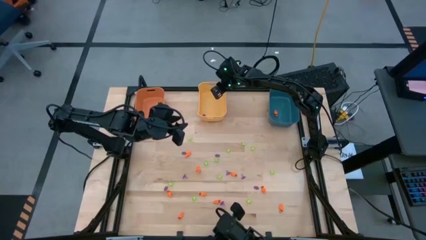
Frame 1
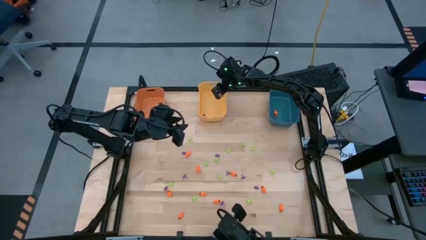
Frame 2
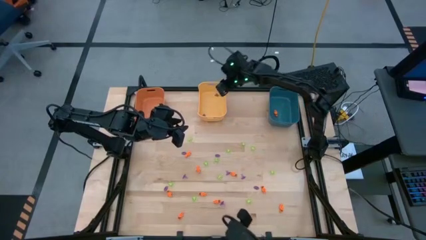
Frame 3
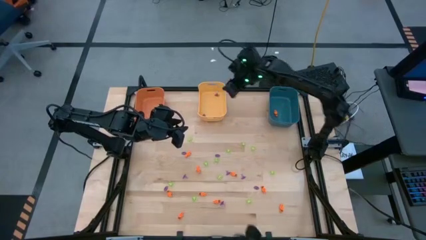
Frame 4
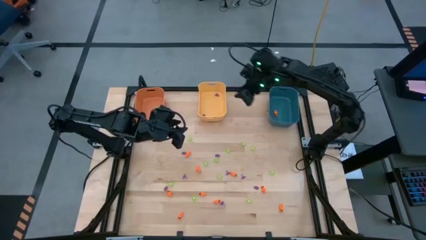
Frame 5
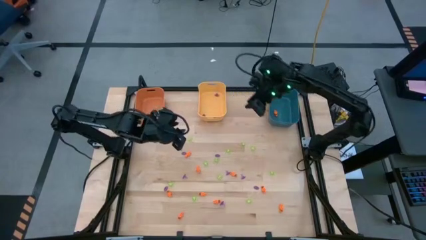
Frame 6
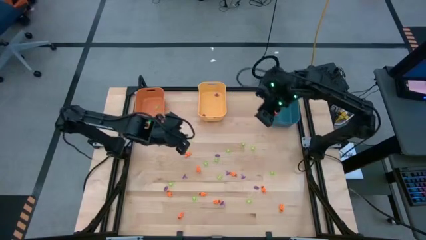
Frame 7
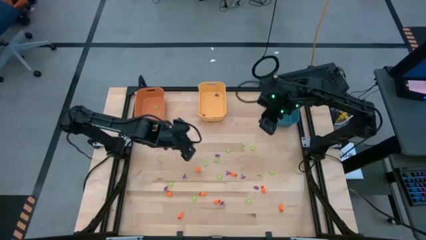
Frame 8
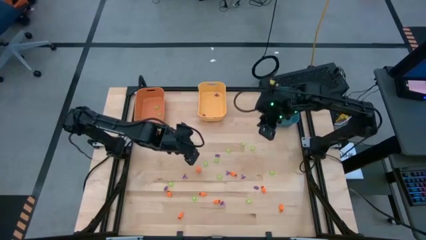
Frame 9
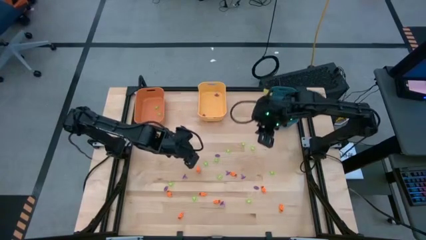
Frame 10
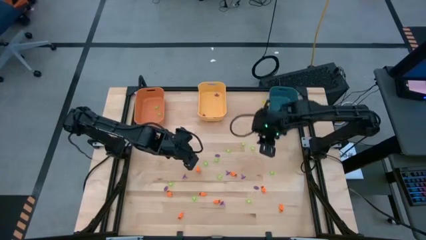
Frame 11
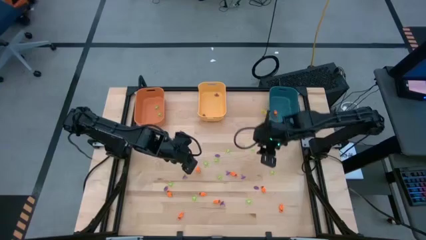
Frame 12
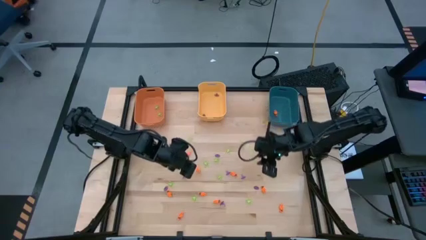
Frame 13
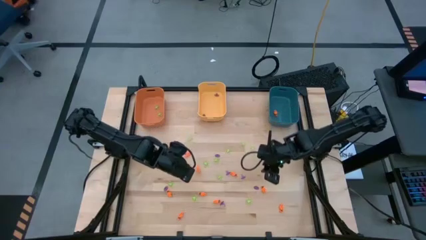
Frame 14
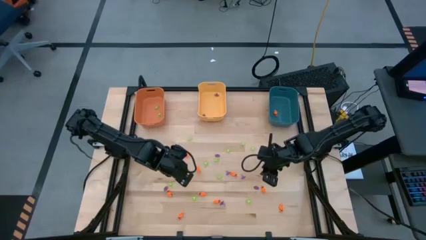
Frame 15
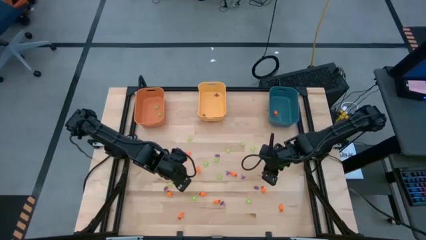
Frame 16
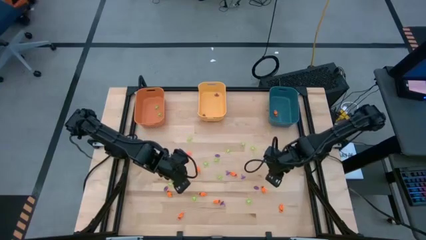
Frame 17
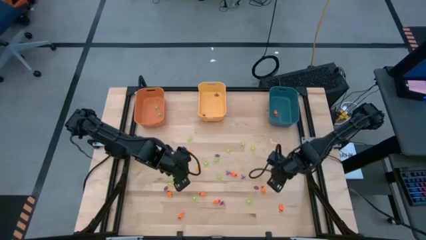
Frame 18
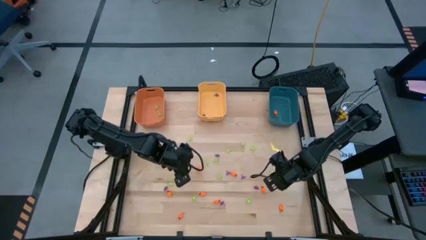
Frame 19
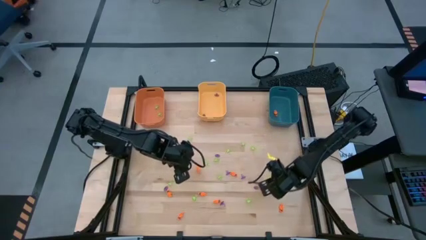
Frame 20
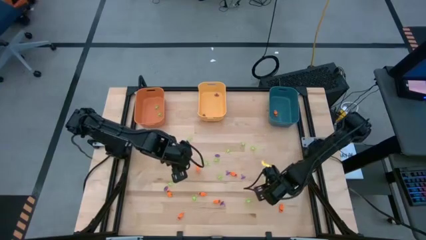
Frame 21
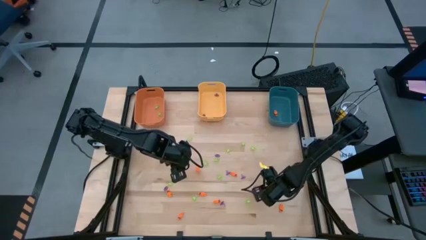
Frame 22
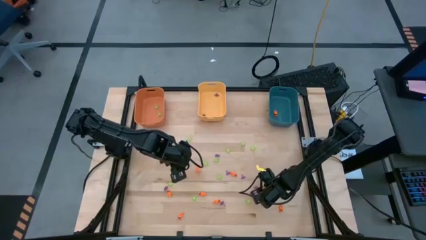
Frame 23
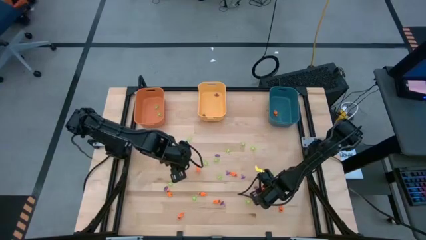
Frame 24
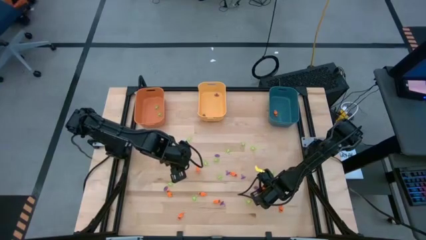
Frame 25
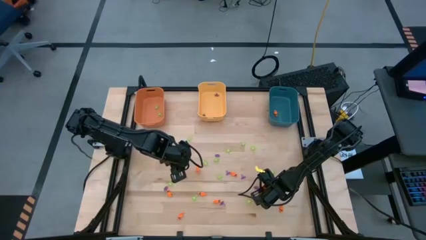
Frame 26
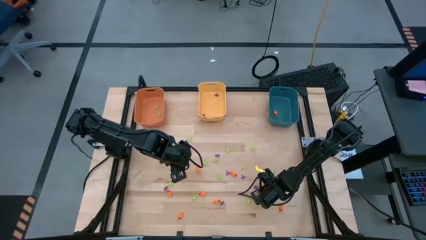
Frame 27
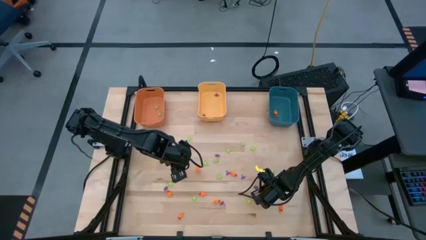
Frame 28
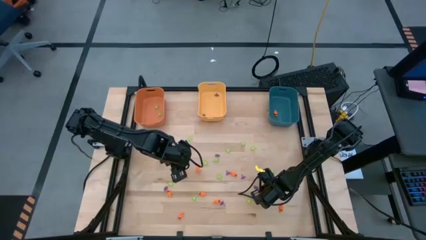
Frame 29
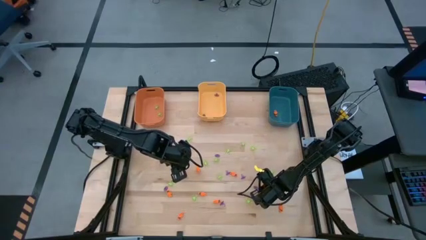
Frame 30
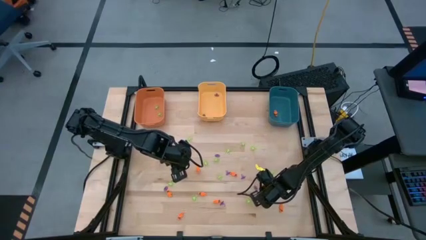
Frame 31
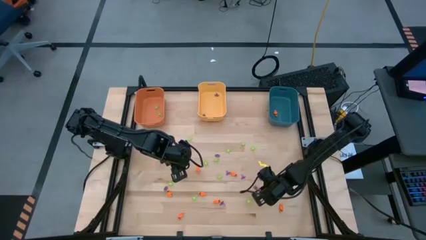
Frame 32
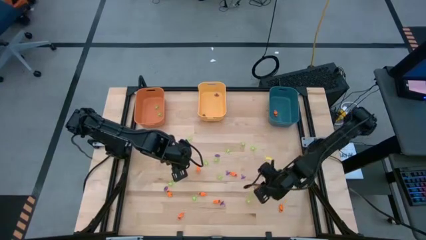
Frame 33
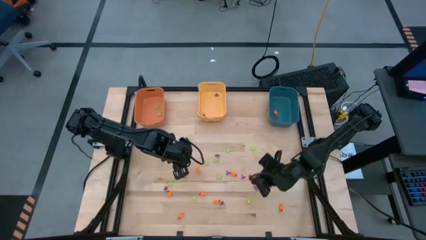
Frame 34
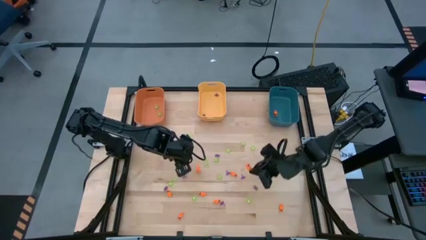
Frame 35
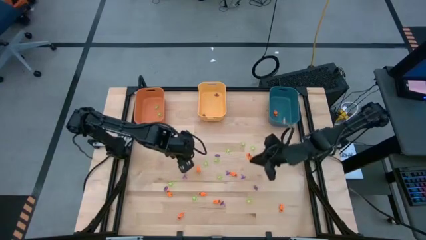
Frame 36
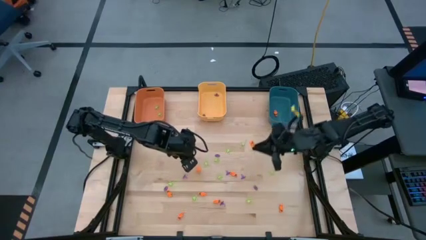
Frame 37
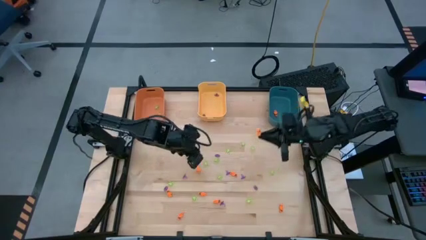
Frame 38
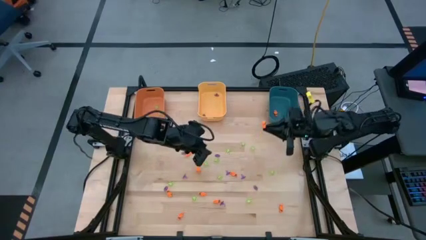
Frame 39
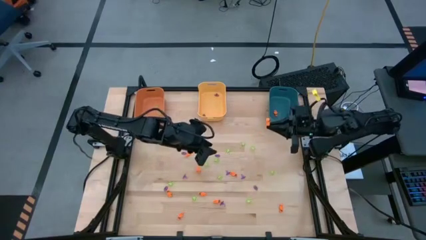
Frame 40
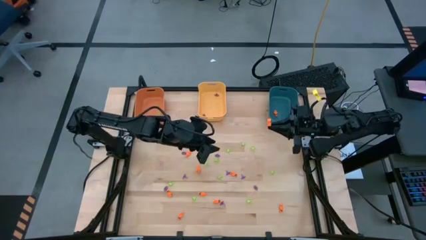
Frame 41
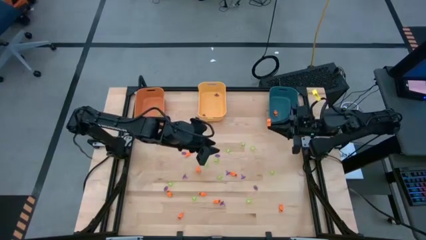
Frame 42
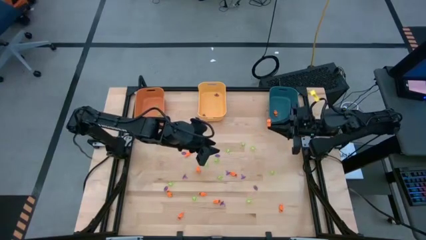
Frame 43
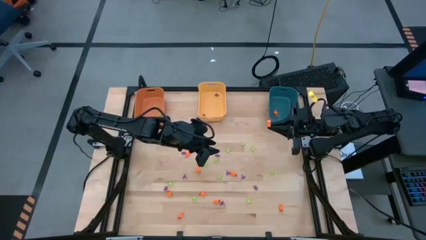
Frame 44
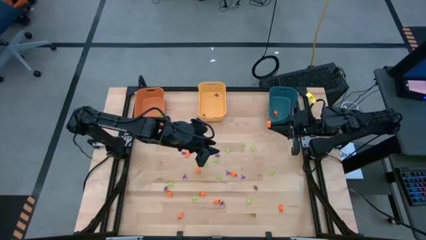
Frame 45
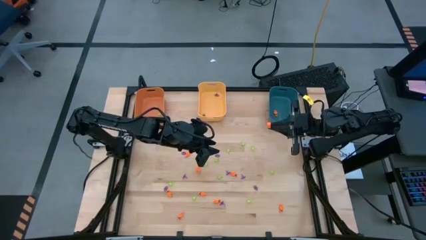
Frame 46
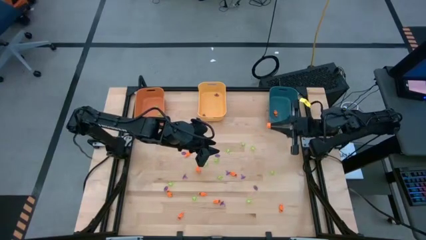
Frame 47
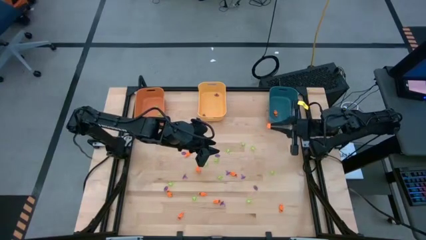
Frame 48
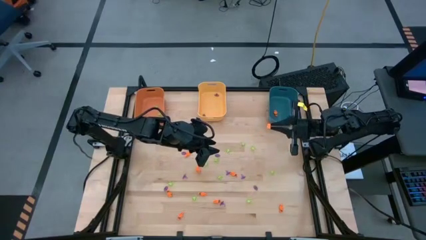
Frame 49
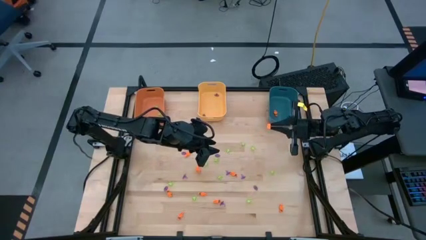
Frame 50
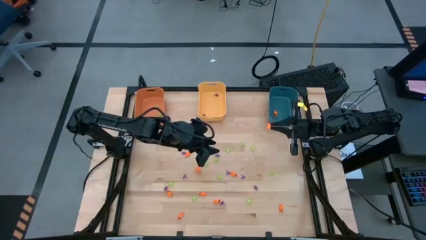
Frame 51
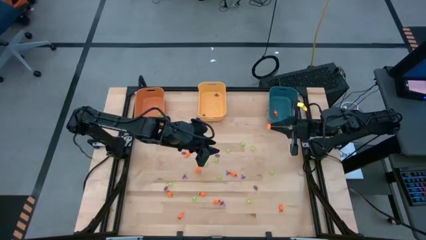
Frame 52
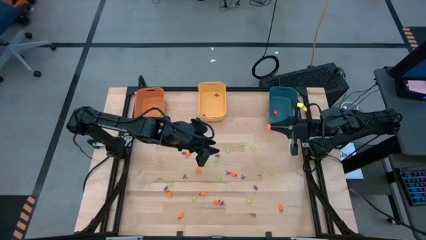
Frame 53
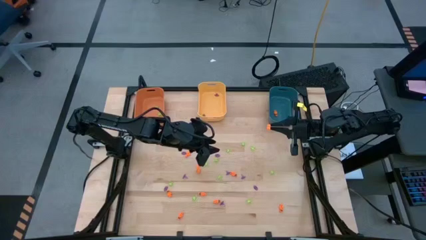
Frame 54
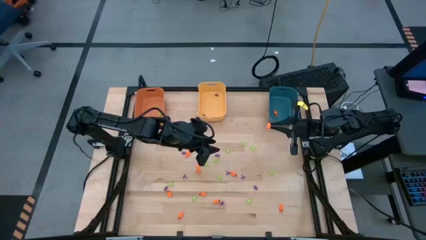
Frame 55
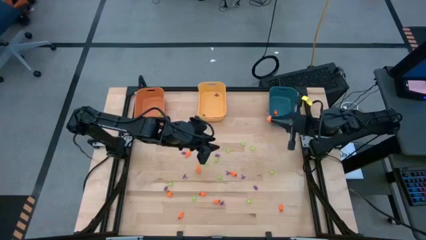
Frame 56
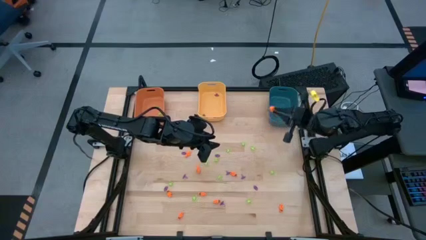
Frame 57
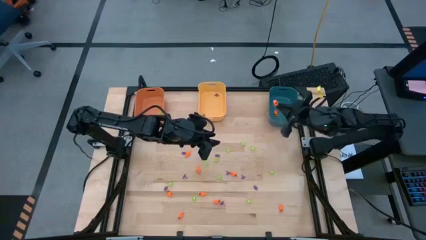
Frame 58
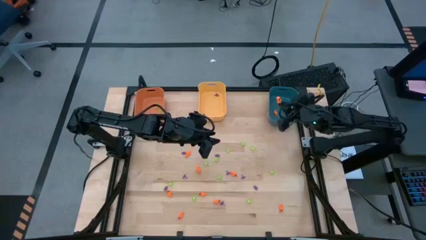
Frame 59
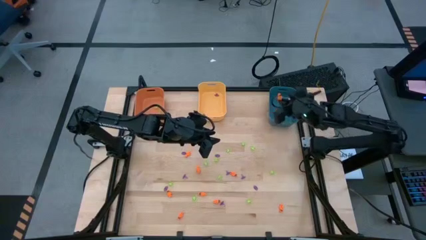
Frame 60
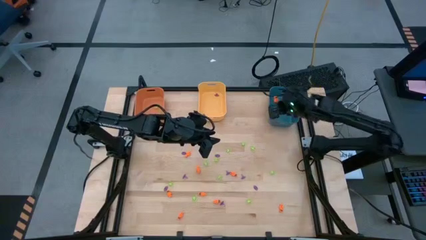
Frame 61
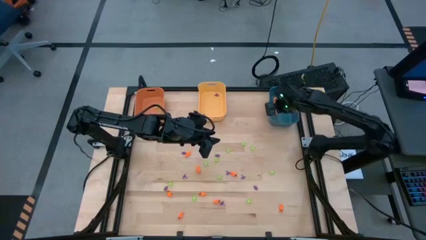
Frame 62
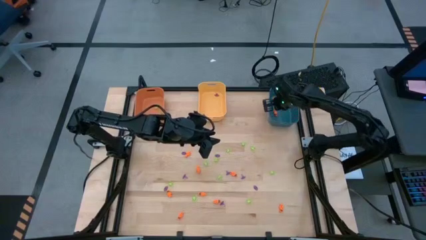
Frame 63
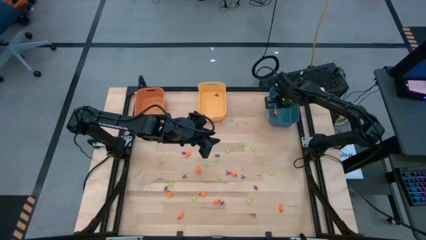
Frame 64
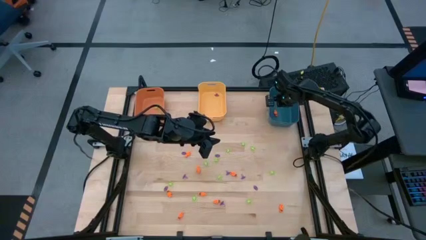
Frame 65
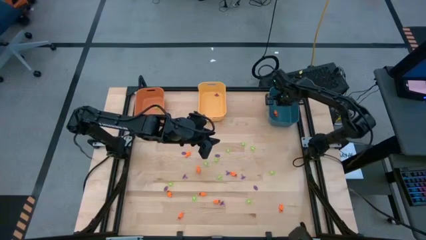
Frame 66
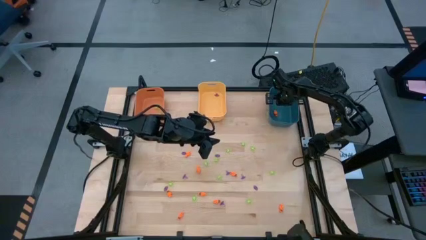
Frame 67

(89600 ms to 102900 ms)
Task: Sort Halloween decoration
Put the orange skeleton toy into the blue bin

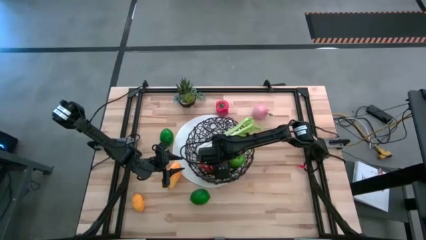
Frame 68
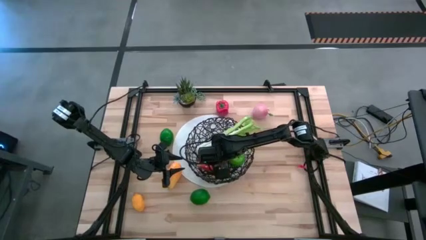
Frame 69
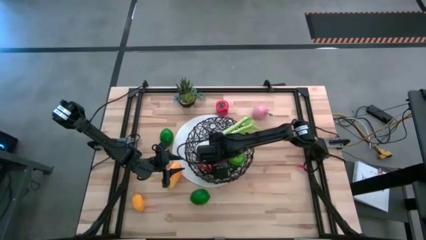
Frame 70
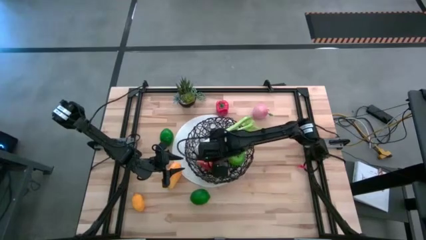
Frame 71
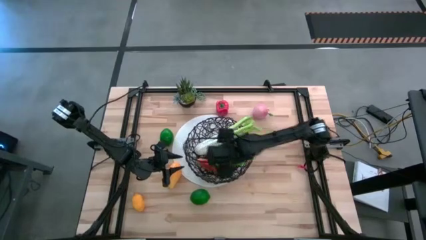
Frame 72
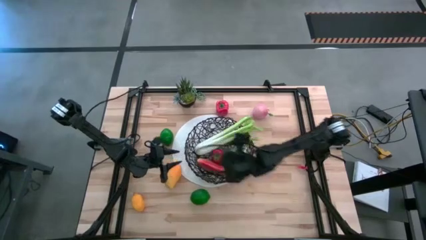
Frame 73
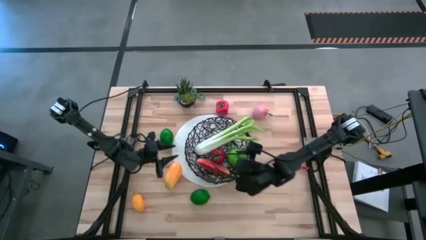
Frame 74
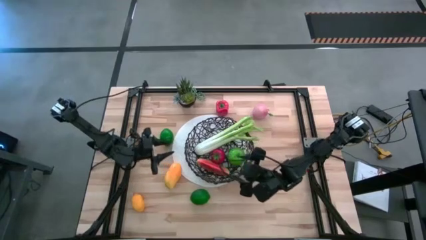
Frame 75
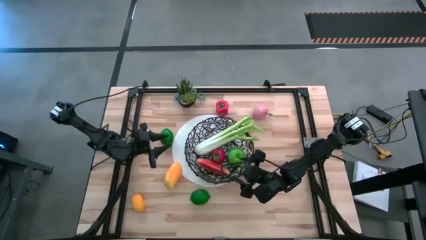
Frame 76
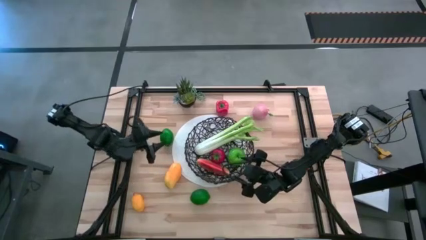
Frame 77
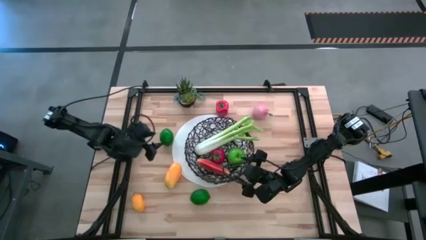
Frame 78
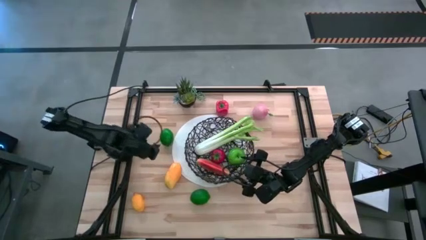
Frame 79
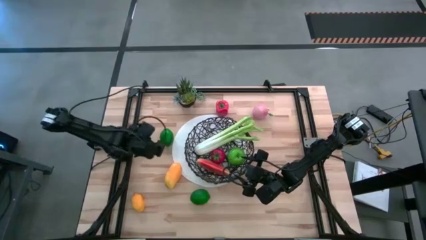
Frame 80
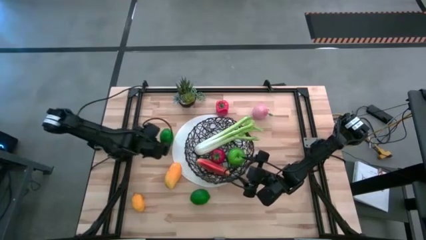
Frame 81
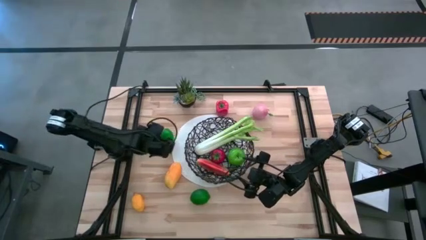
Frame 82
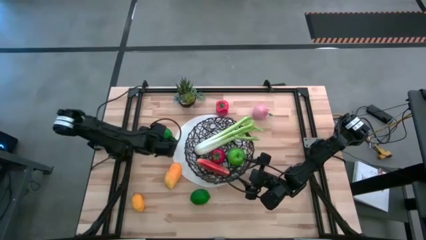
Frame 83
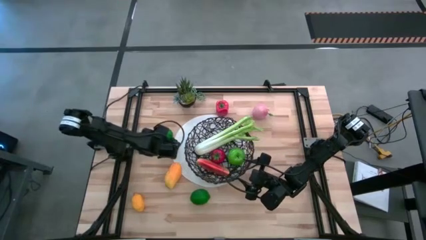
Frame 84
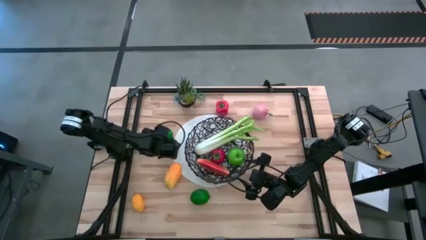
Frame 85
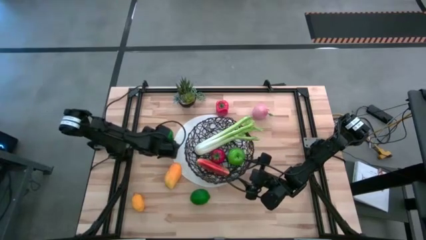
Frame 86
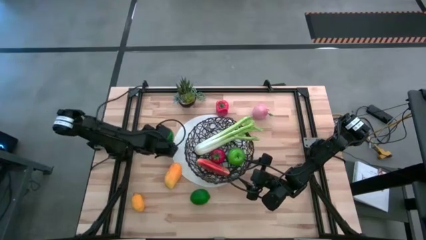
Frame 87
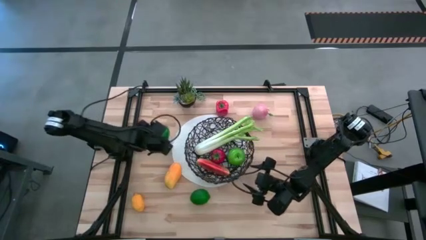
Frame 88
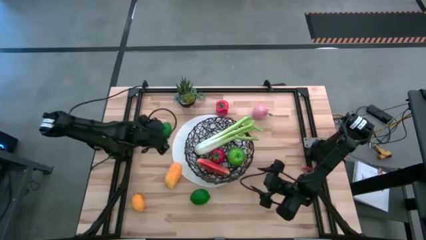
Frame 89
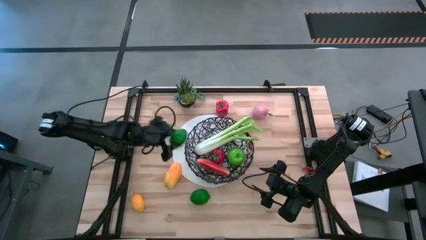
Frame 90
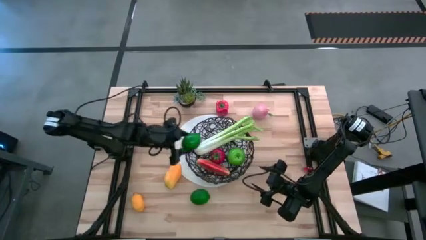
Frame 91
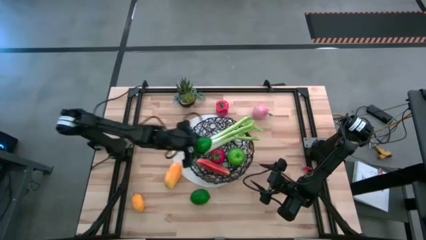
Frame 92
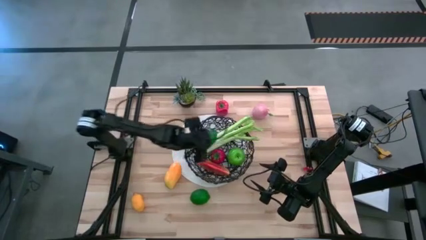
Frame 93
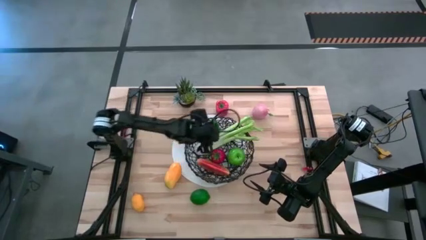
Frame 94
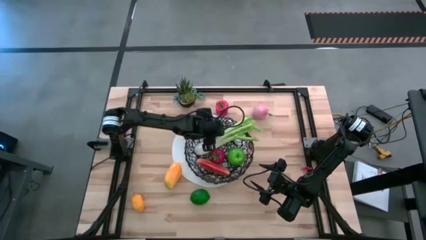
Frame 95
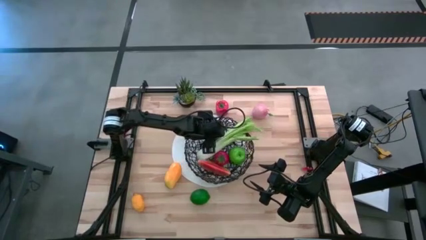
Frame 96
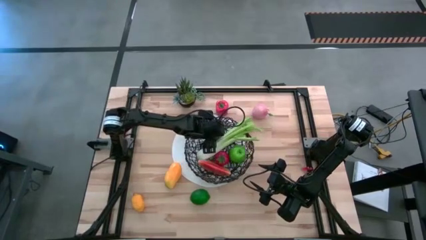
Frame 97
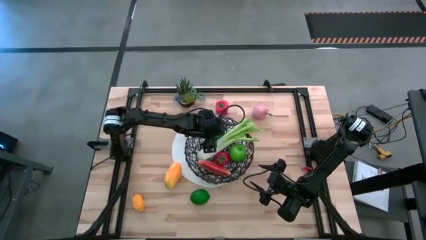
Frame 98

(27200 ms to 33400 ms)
Task: Build produce basket
Put the green lime into the wire basket
